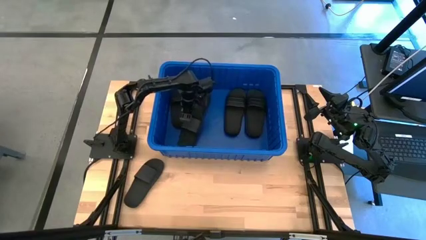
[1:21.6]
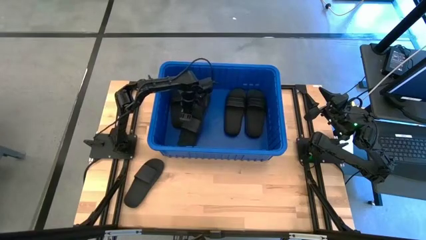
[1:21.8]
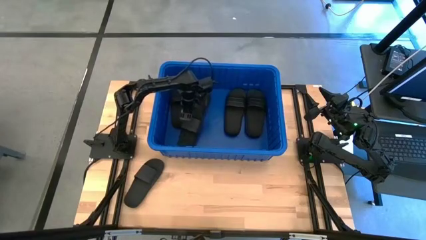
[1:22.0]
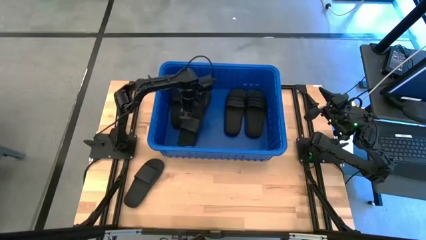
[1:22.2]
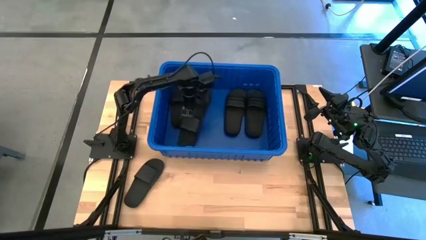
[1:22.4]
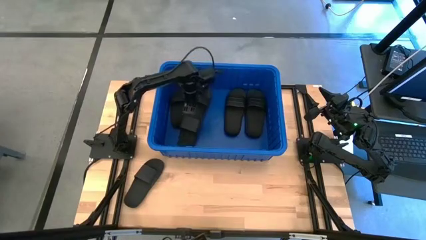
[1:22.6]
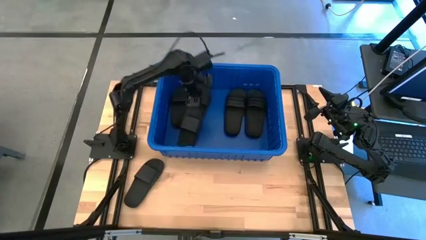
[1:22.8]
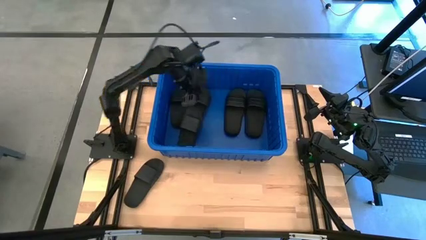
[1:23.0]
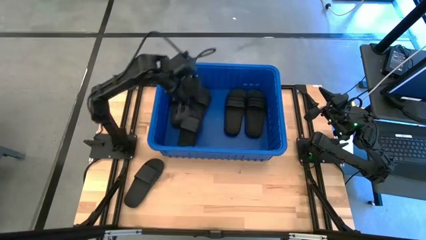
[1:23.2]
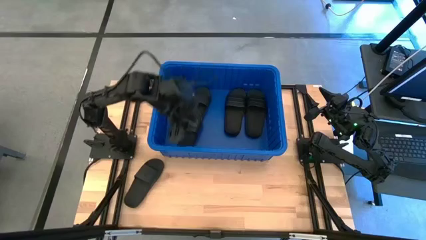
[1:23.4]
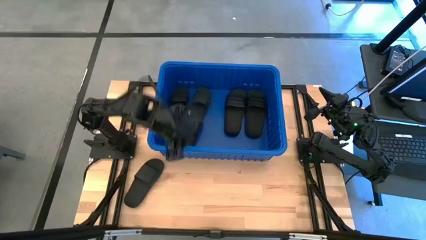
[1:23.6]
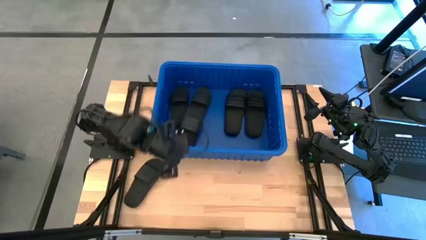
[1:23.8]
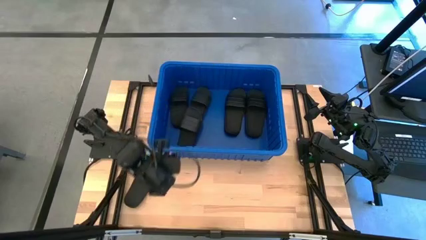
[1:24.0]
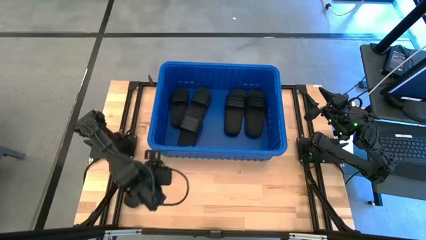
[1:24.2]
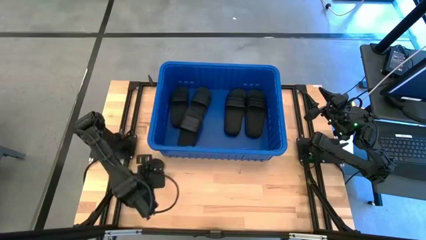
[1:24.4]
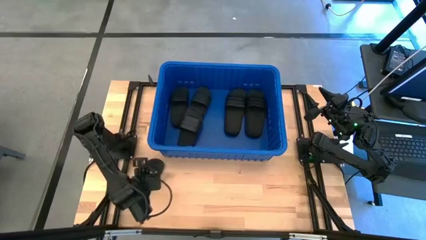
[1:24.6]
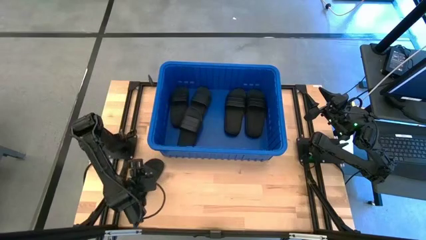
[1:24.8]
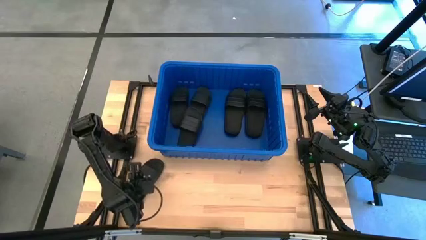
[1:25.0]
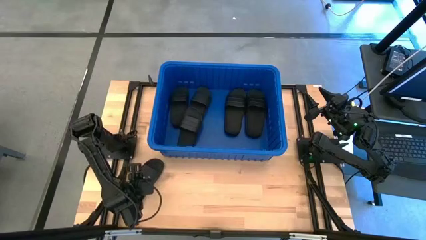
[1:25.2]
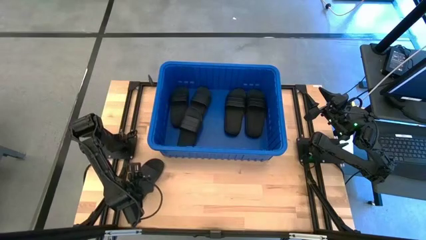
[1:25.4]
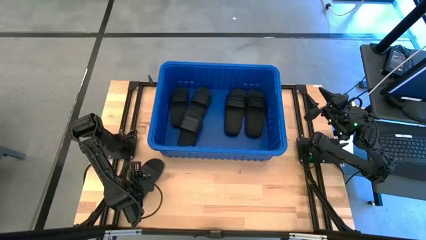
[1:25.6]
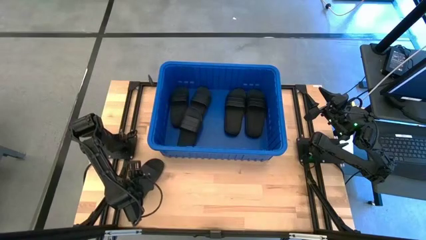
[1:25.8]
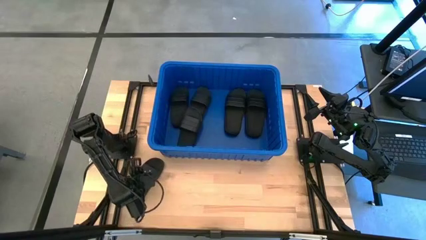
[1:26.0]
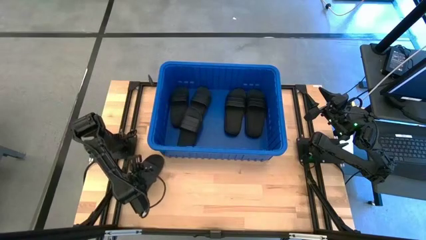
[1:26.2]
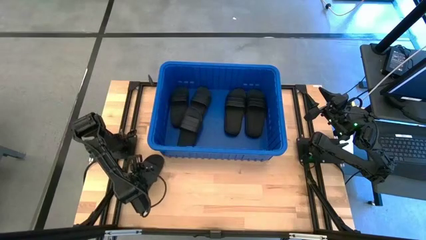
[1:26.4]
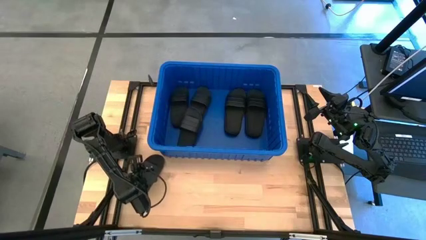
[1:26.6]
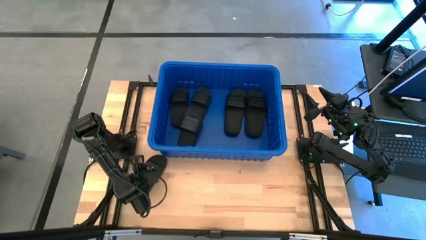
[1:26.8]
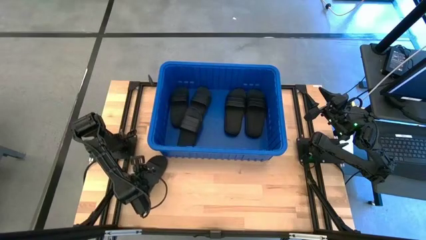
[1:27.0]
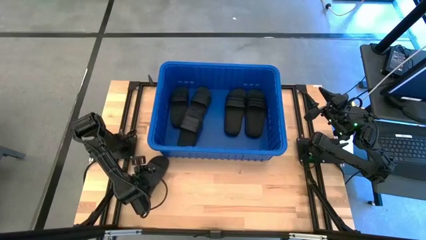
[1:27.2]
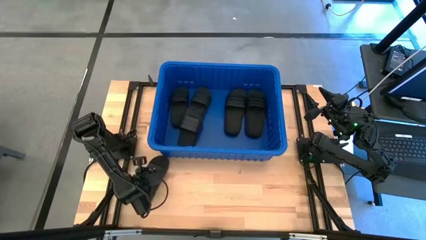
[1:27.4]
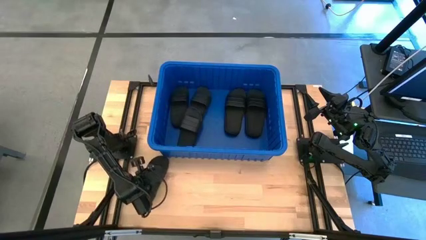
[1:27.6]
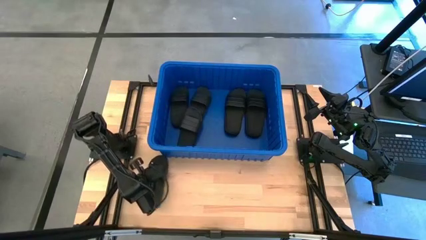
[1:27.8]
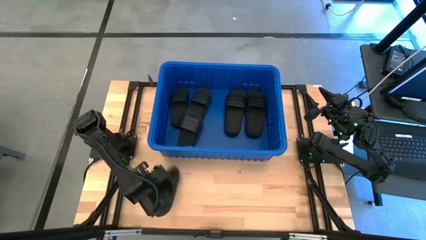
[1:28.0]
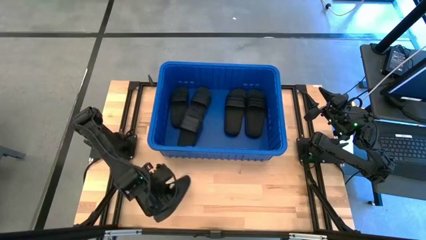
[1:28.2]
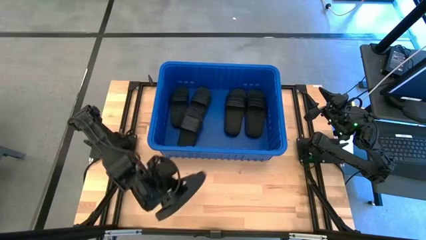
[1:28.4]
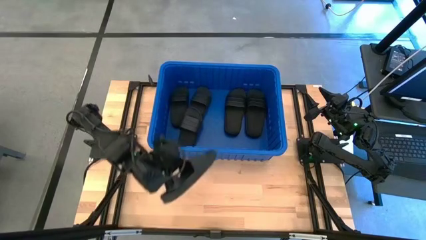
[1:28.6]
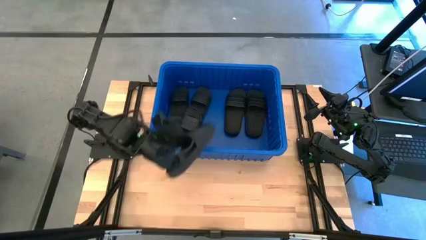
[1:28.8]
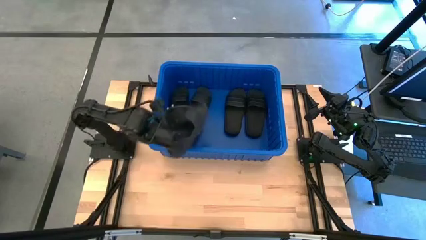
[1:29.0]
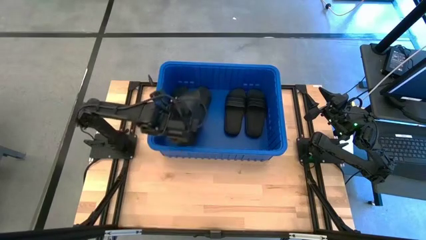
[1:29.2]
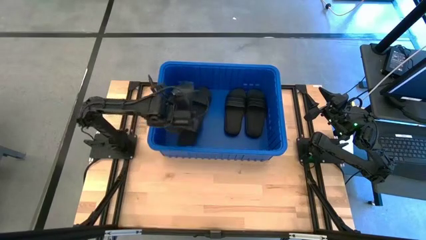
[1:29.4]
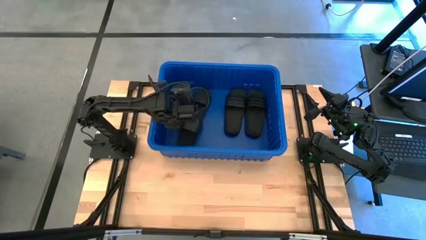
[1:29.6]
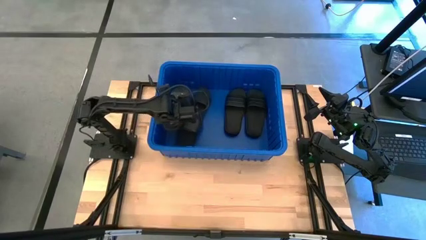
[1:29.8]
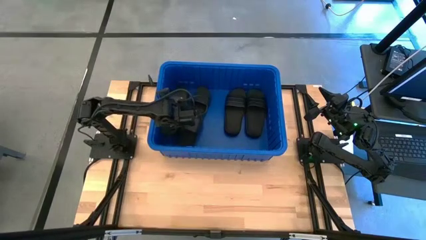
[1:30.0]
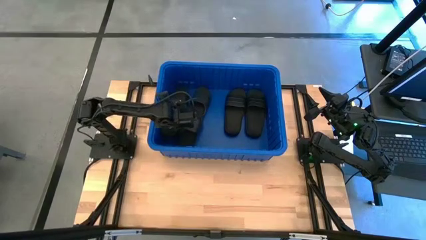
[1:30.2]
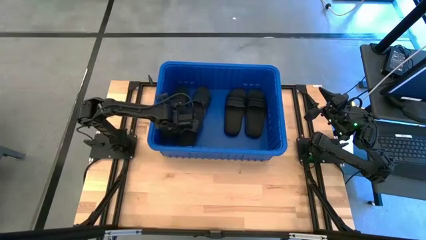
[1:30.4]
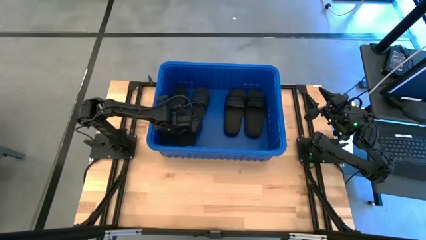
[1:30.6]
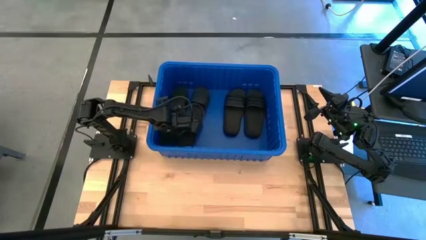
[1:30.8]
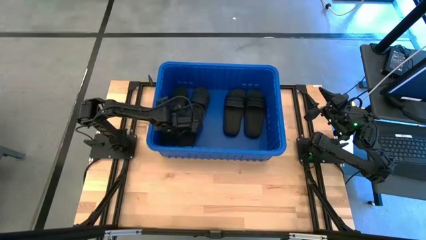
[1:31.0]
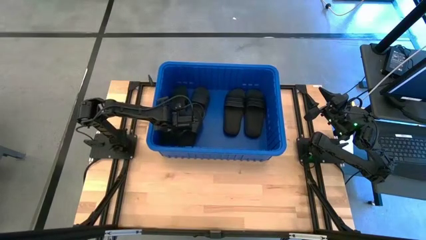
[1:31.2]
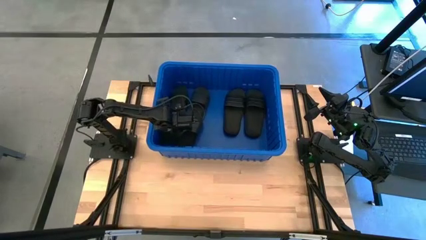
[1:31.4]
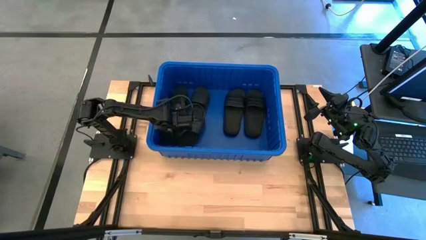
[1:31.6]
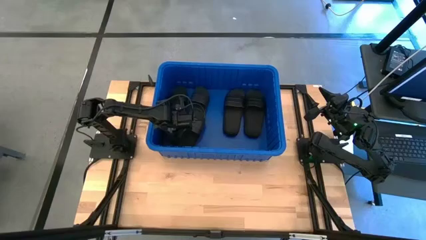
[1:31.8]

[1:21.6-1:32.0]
Task: Pick and place slides into bin
Put the black slide into the blue bin

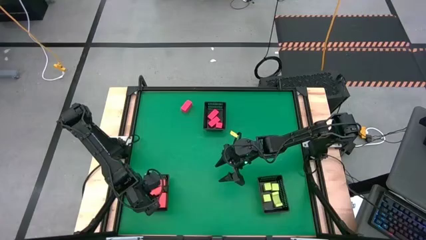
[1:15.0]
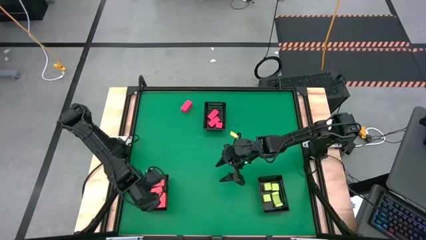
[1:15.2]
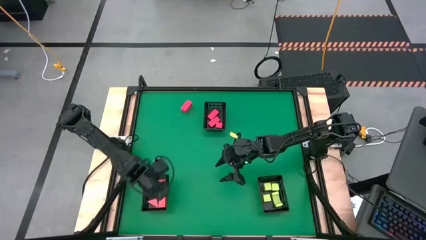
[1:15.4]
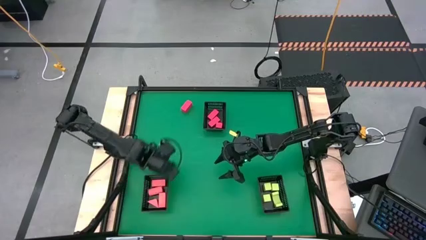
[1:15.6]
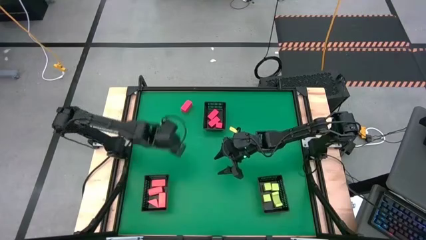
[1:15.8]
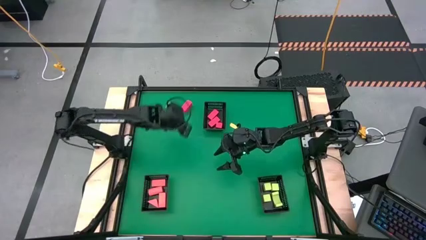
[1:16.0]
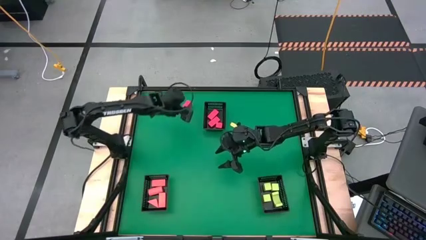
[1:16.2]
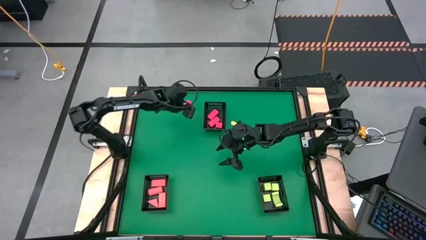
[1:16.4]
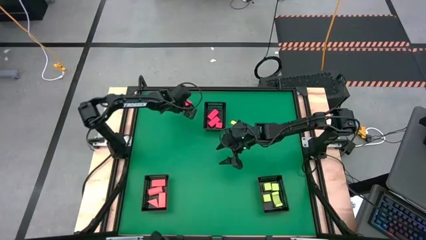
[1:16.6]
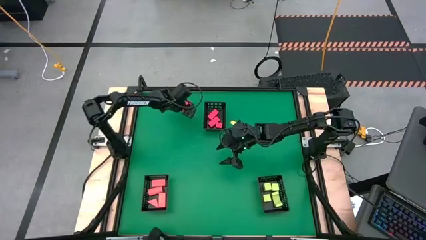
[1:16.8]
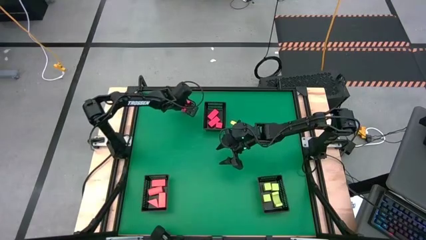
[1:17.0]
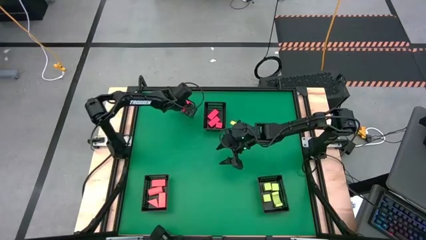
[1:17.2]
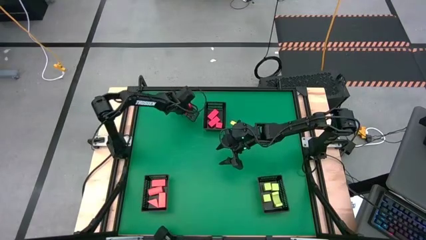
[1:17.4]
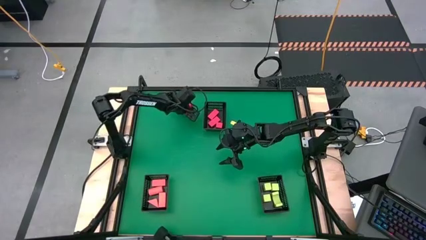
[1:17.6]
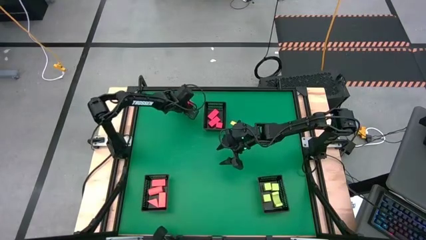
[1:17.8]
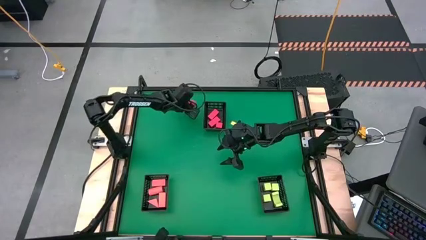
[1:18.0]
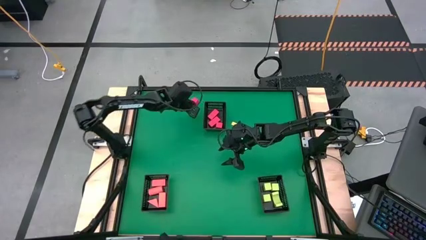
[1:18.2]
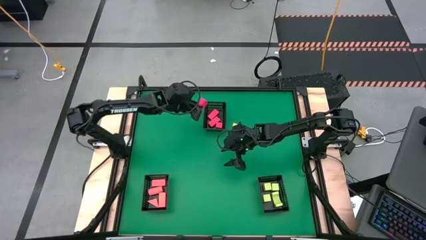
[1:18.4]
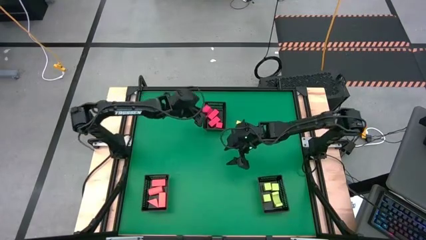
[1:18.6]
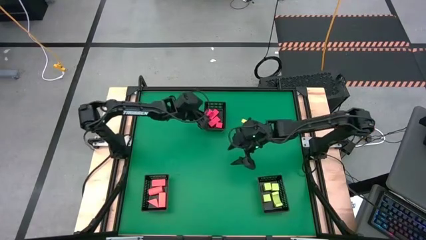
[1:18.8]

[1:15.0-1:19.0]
Task: Sort & place blocks by color
Put the red block into the top black bin
